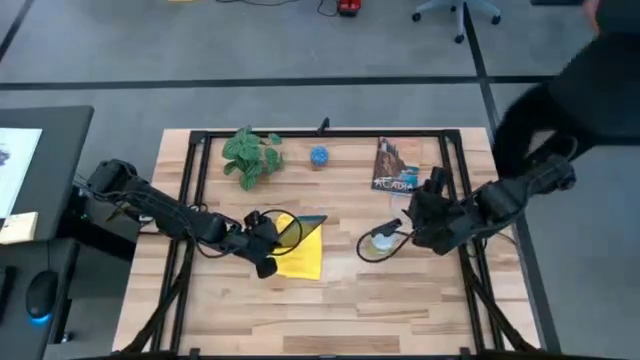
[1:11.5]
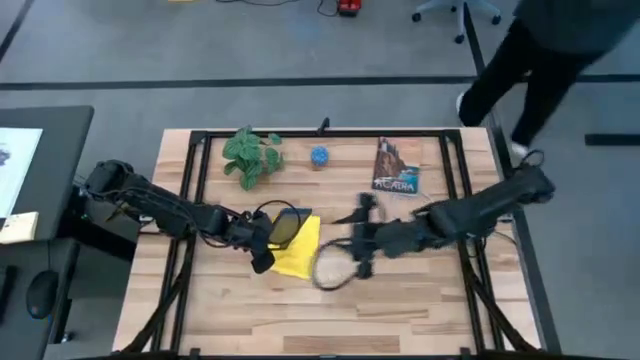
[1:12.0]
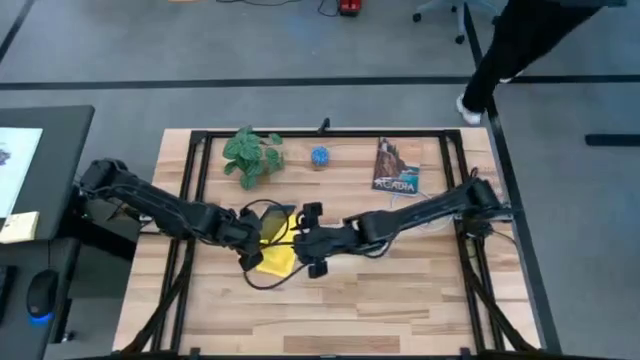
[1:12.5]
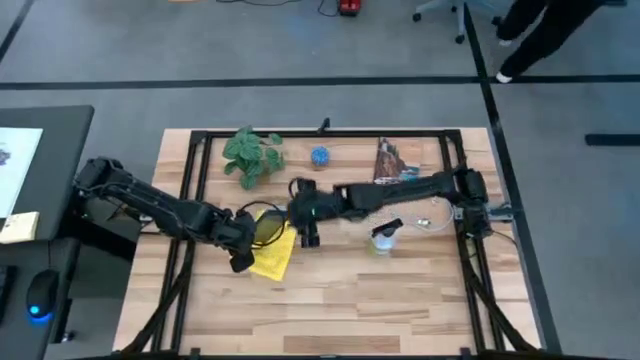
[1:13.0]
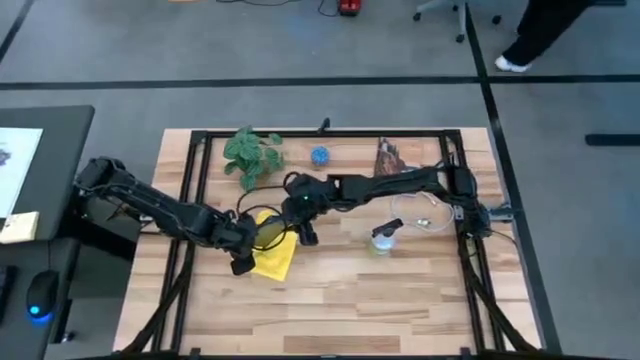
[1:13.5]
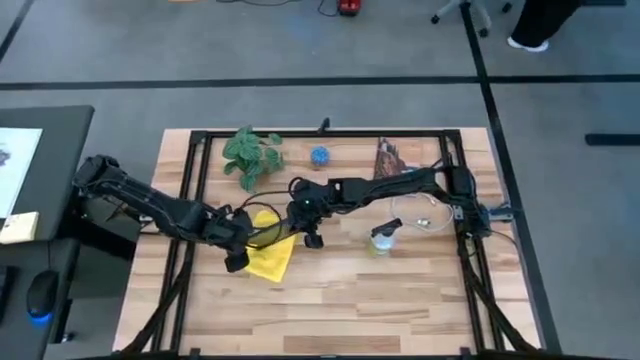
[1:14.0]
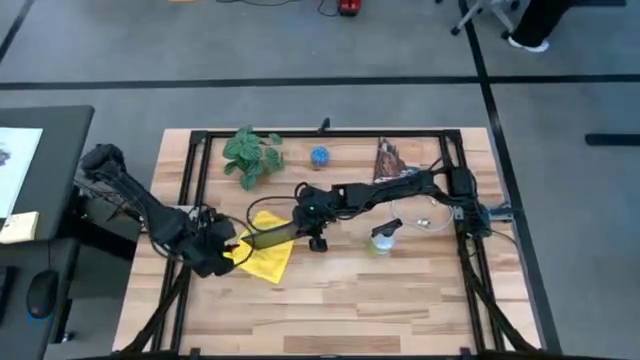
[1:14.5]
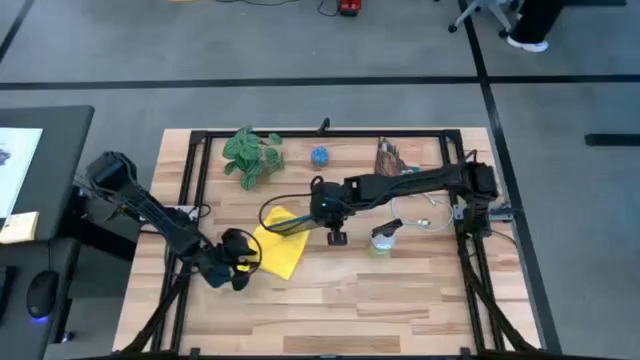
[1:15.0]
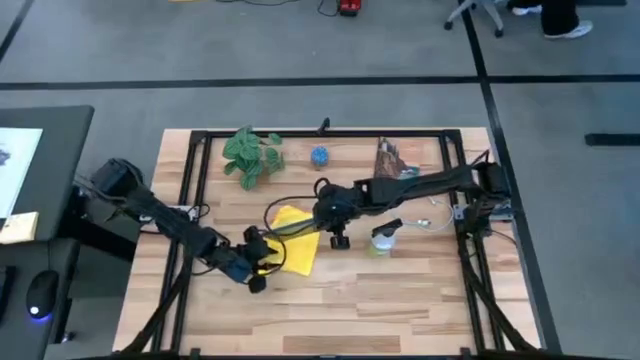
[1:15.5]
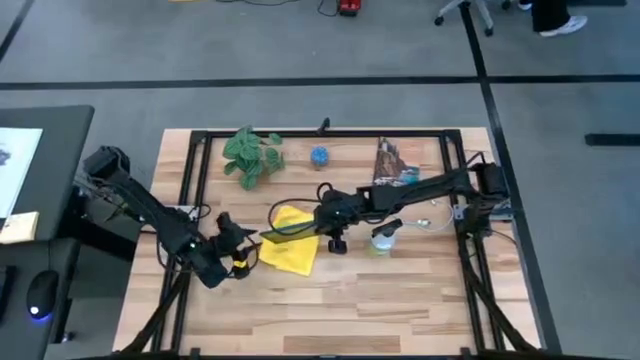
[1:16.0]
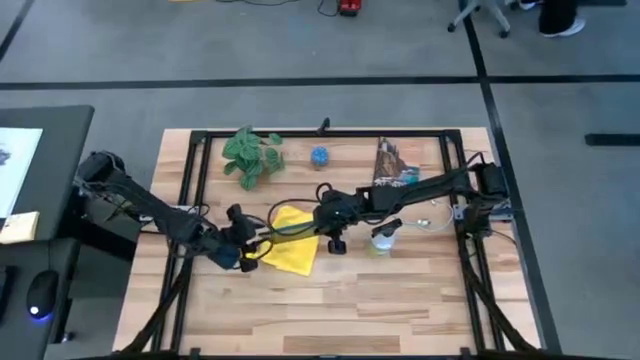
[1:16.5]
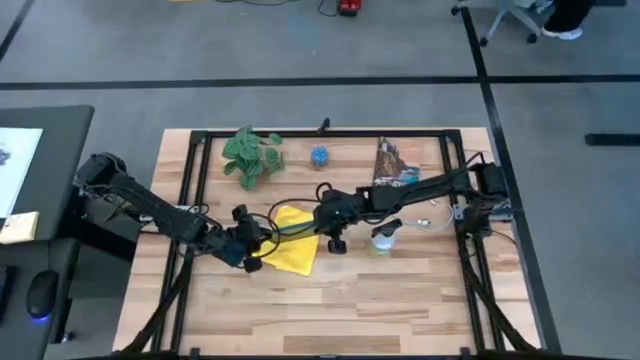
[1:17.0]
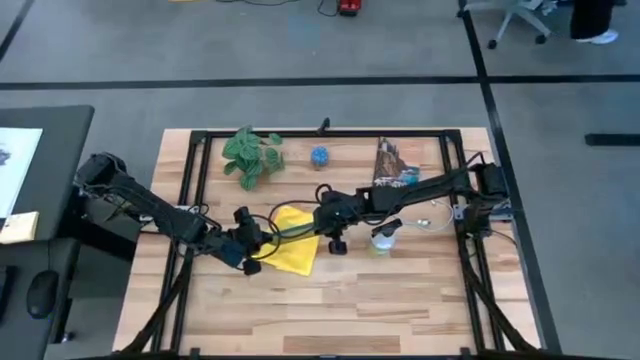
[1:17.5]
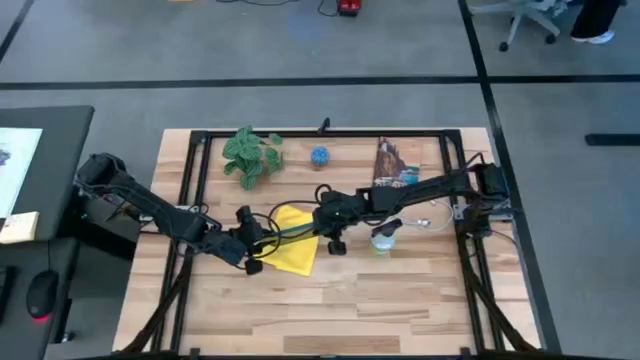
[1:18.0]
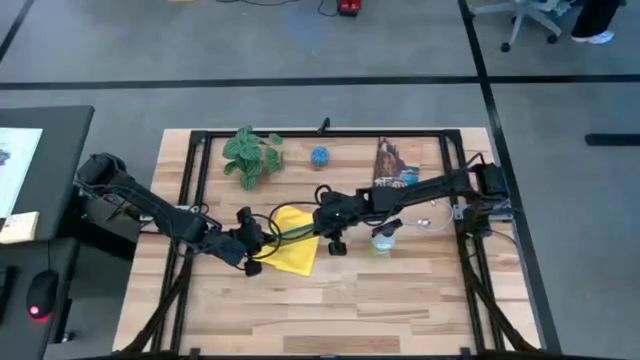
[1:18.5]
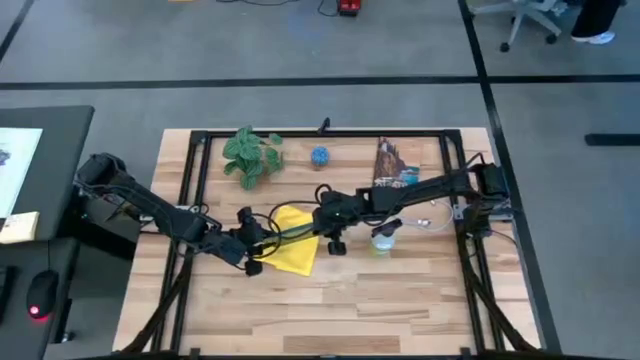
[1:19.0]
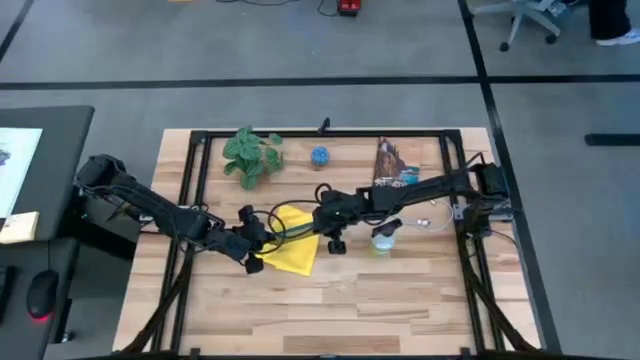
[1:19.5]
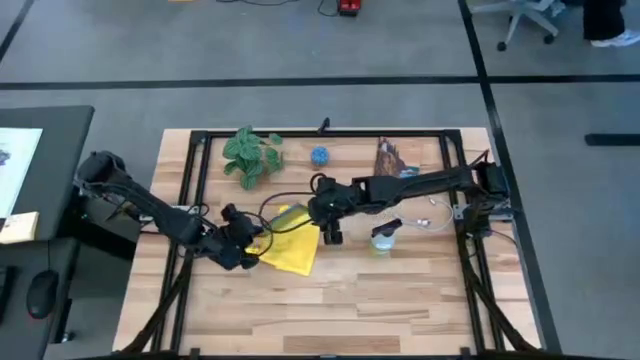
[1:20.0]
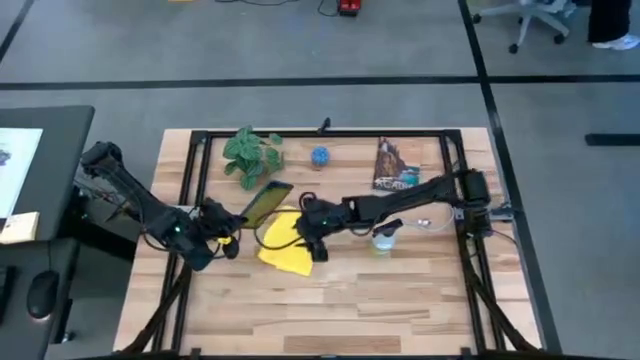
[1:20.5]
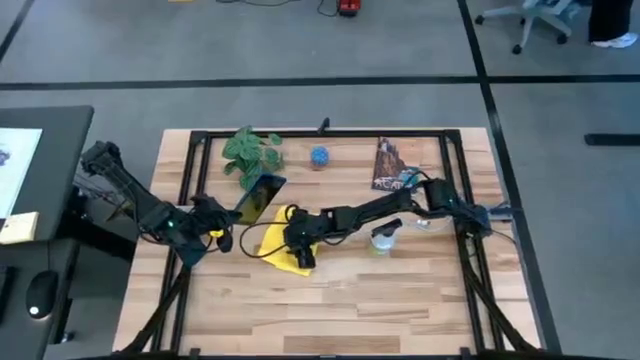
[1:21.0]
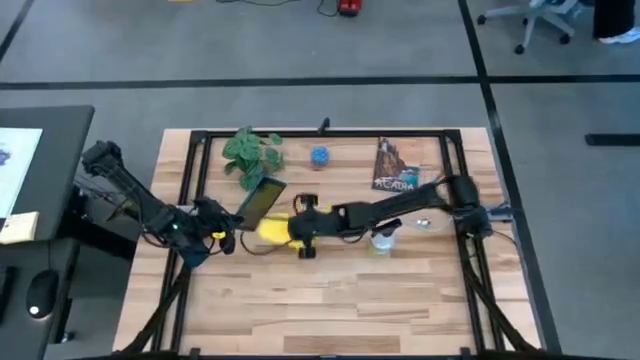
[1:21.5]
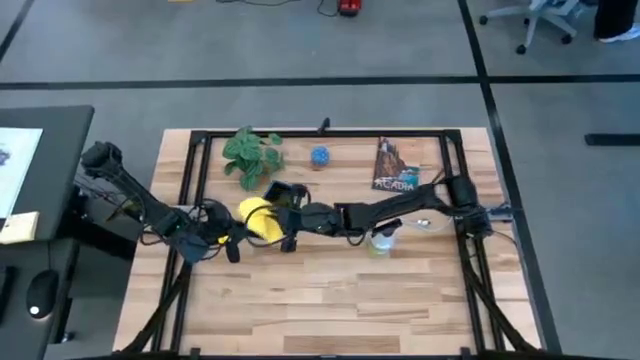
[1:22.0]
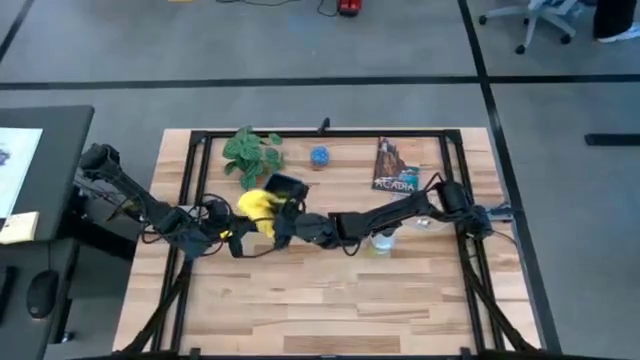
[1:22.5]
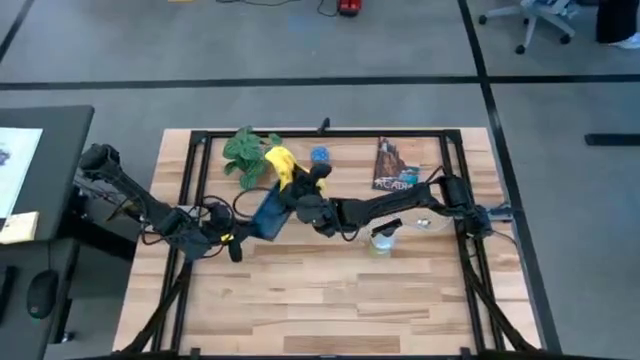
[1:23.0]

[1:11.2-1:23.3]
Task: Apply microfiber cloth
Wipe the blue tablet with the yellow microfiber cloth

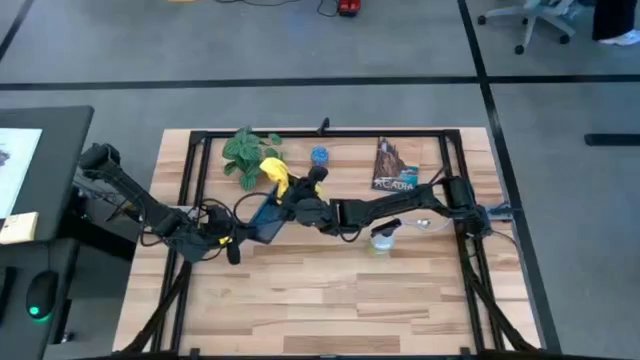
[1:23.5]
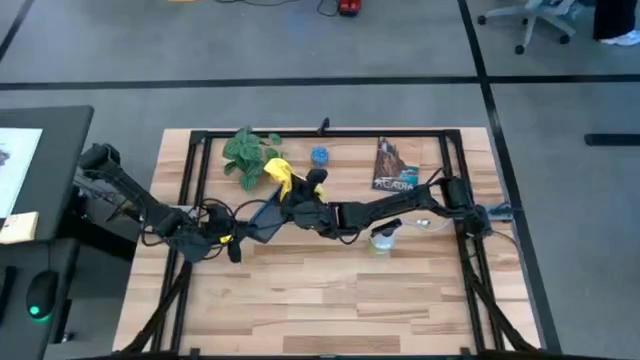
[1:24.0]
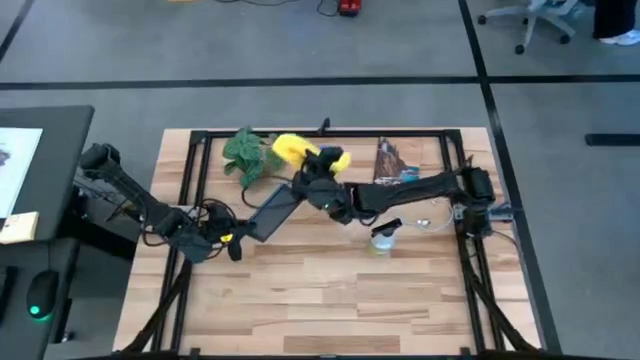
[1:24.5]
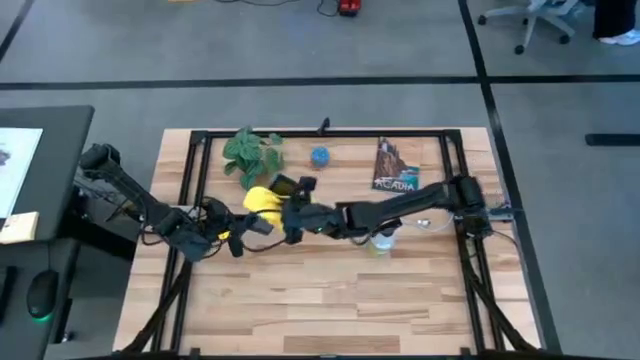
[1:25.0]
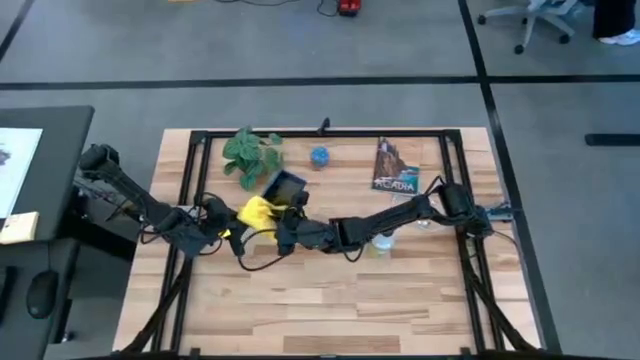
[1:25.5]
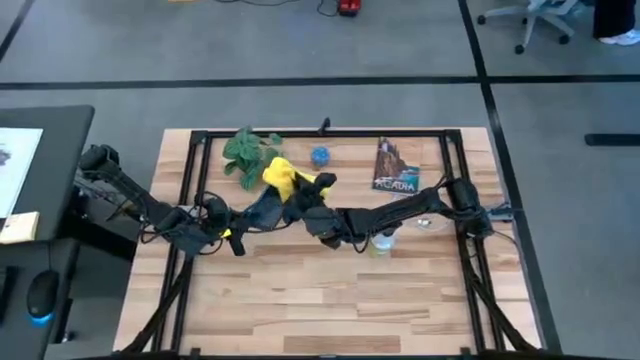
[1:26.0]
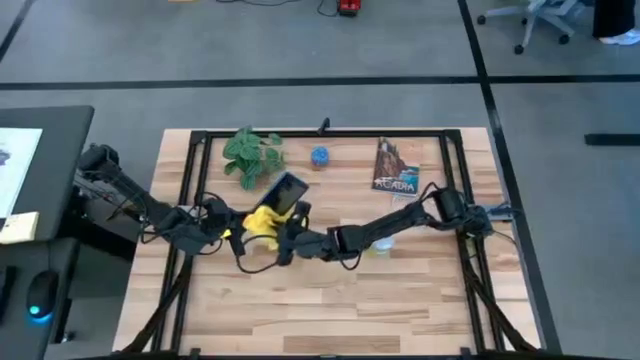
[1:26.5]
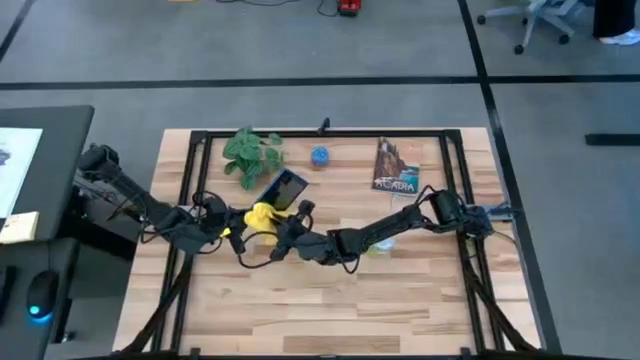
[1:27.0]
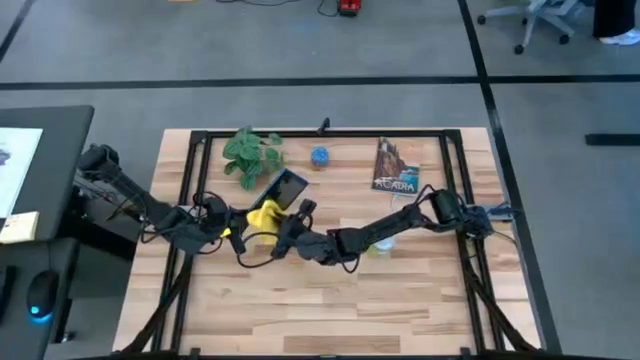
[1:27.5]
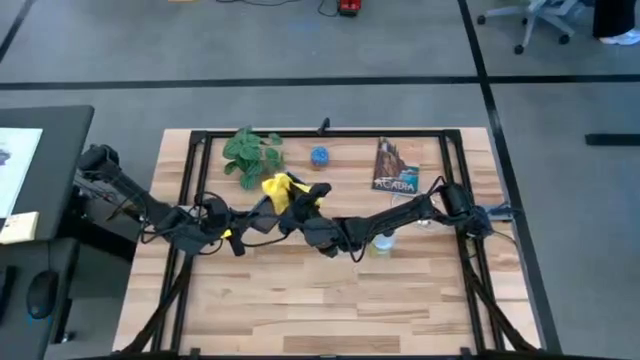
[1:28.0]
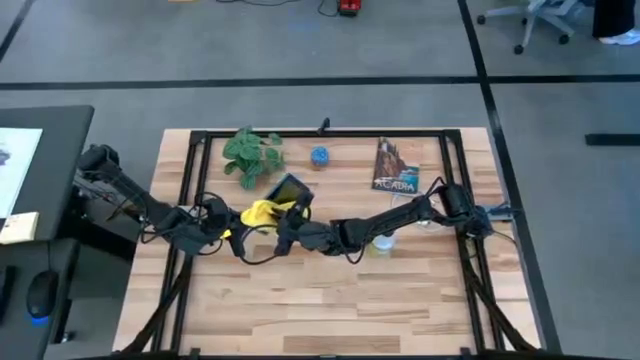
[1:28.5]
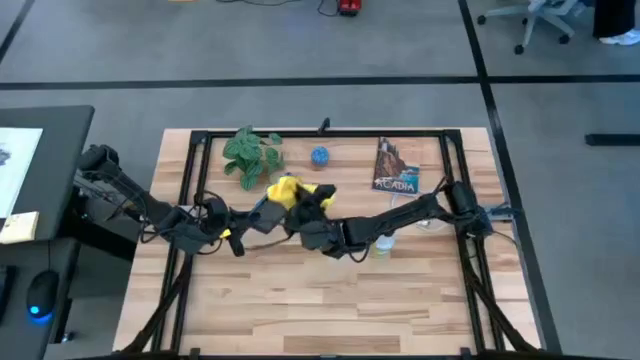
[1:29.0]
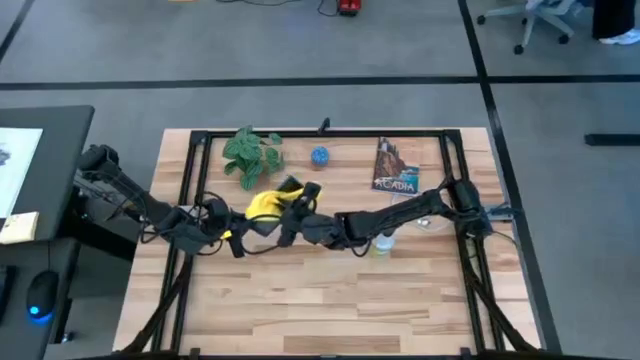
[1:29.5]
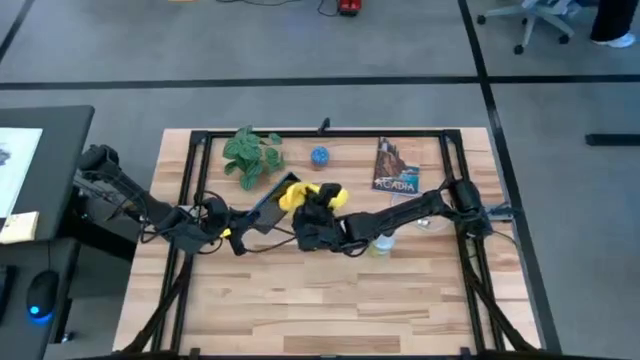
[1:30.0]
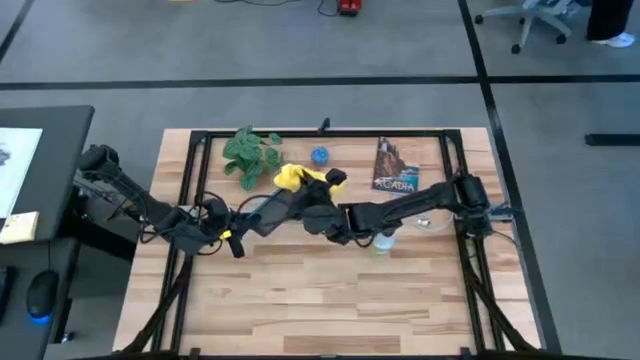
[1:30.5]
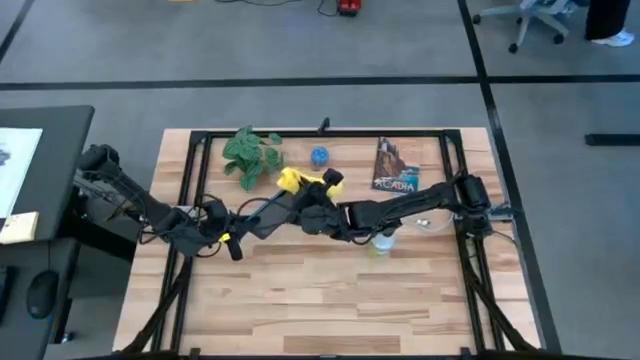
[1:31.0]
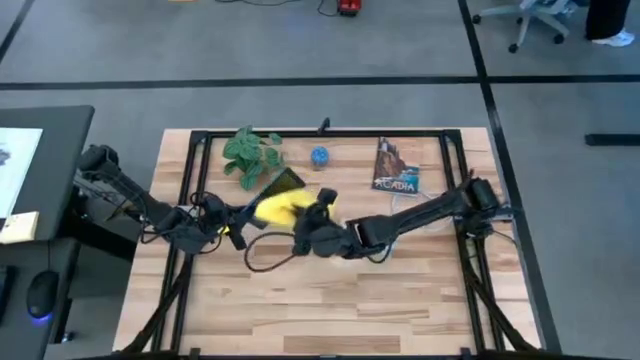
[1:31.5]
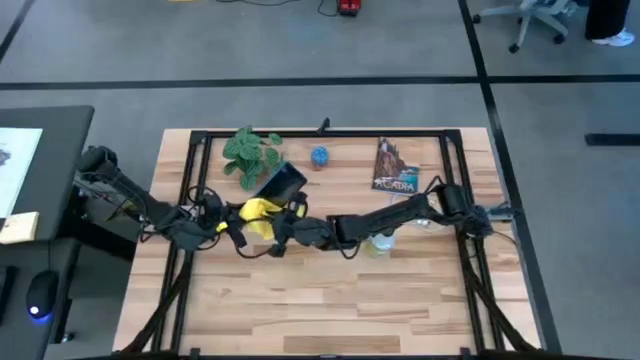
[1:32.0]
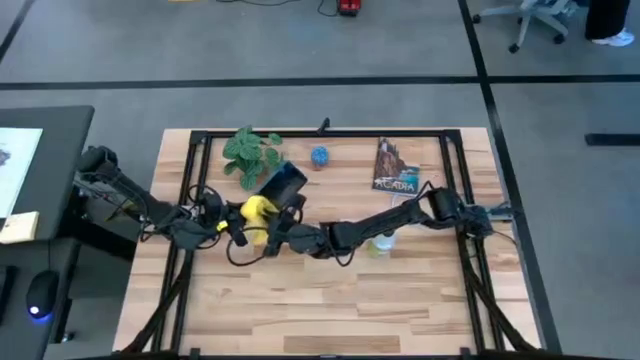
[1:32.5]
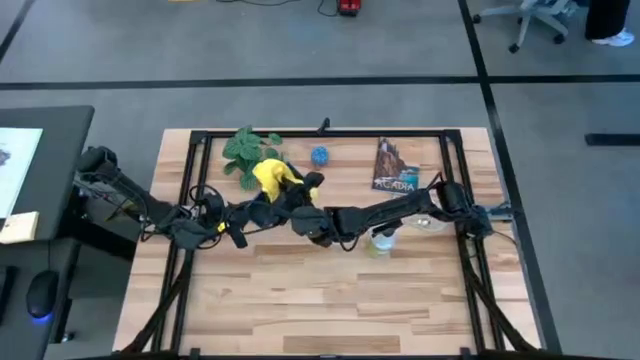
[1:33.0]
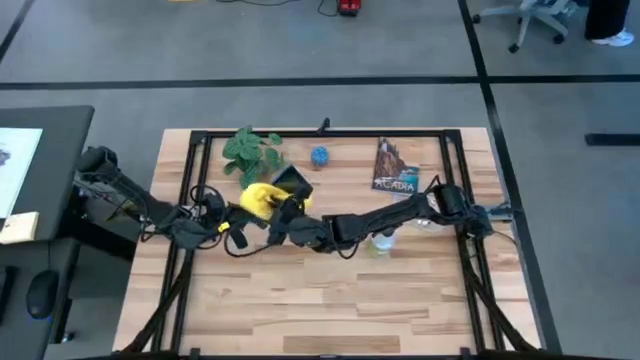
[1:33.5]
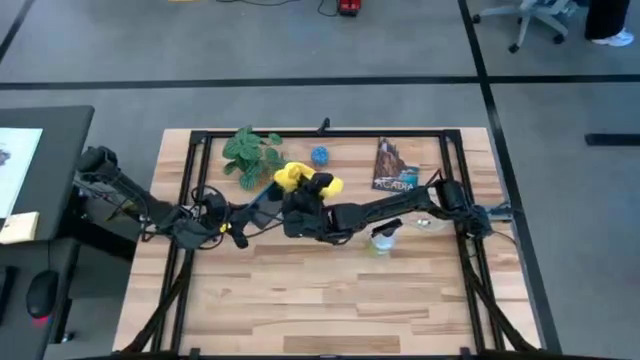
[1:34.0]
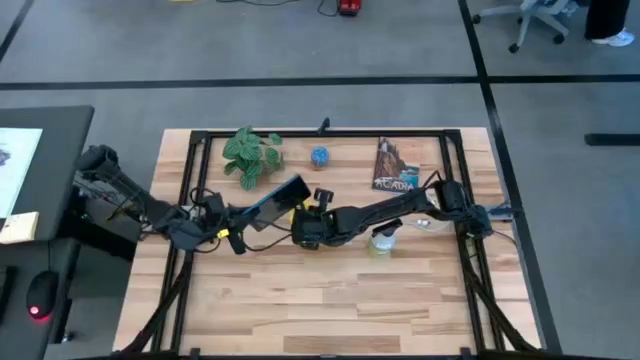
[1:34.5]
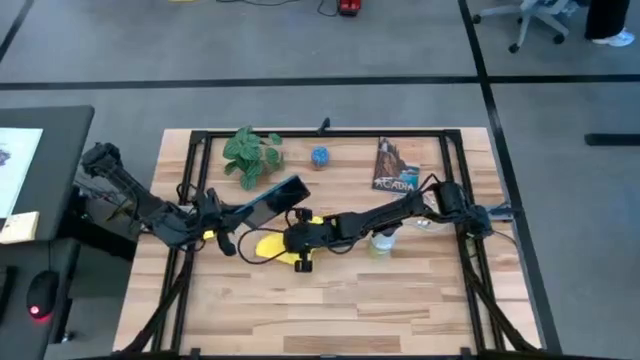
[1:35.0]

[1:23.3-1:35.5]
Wipe the blue tablet with the yellow microfiber cloth
